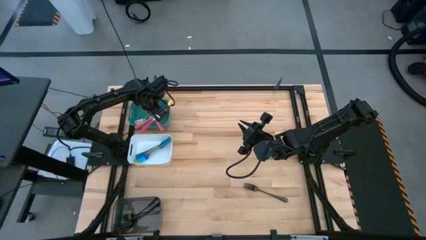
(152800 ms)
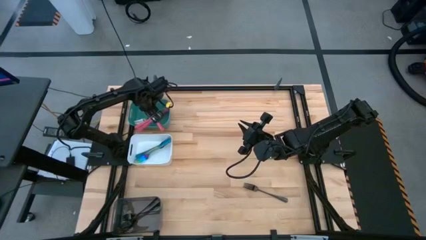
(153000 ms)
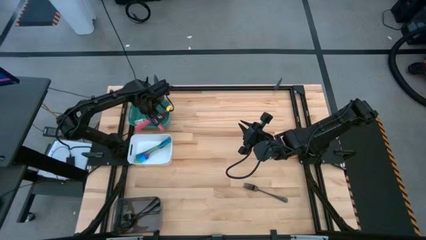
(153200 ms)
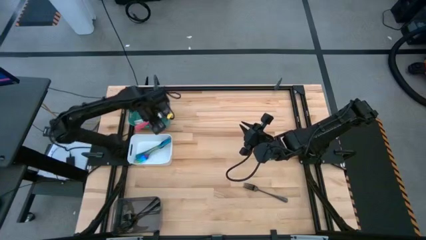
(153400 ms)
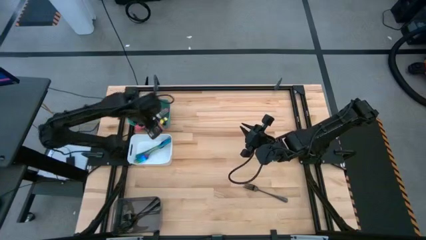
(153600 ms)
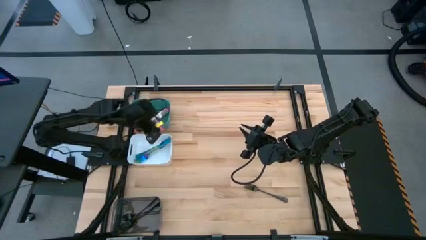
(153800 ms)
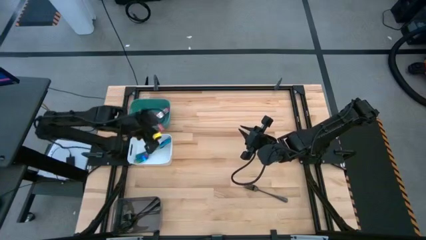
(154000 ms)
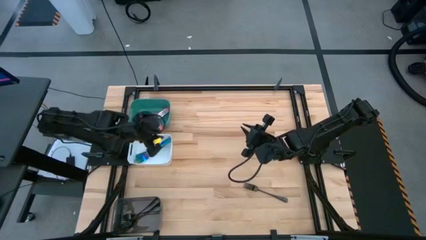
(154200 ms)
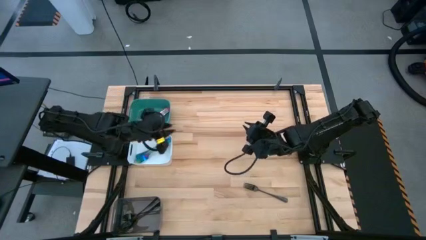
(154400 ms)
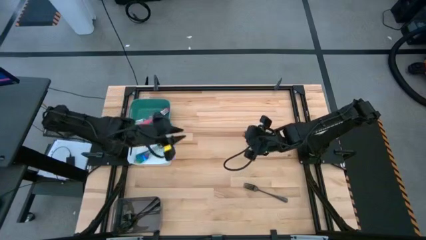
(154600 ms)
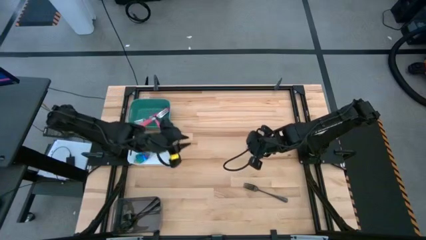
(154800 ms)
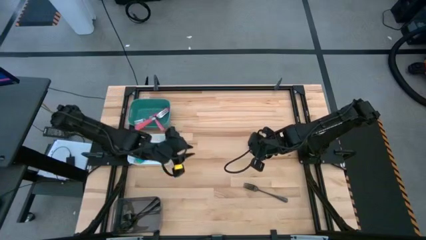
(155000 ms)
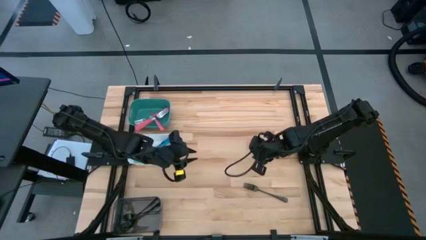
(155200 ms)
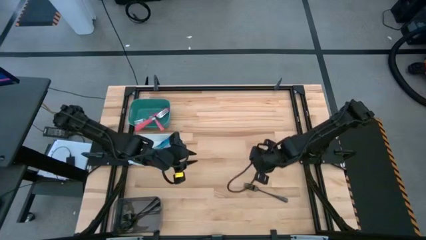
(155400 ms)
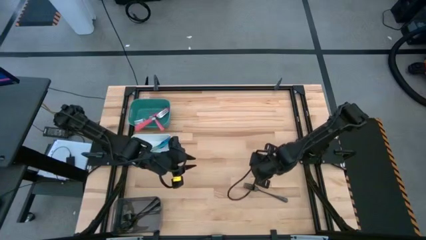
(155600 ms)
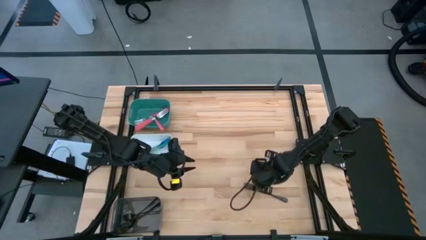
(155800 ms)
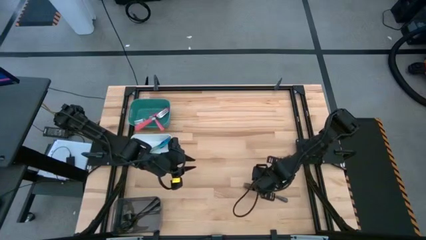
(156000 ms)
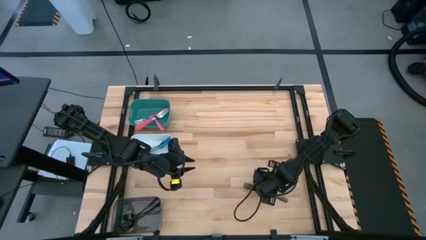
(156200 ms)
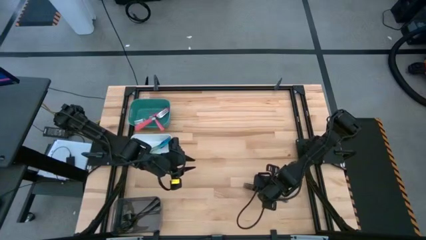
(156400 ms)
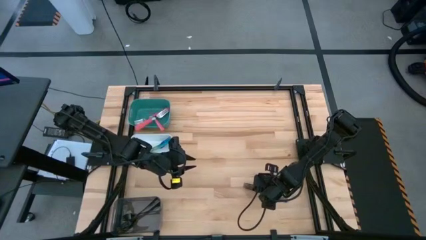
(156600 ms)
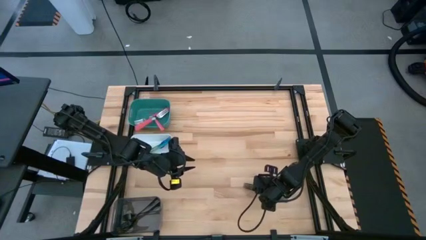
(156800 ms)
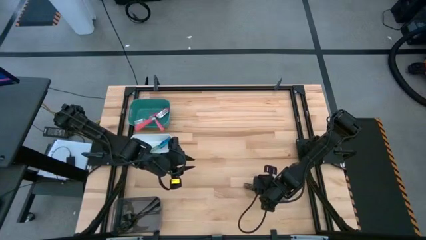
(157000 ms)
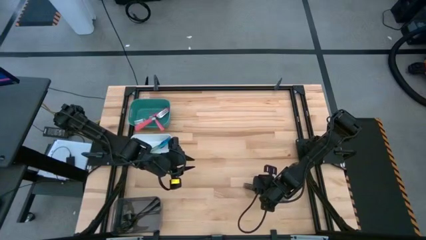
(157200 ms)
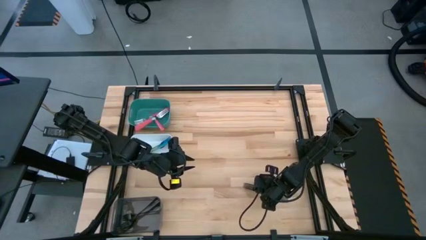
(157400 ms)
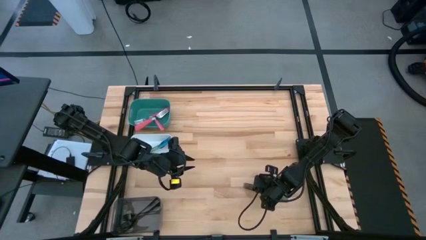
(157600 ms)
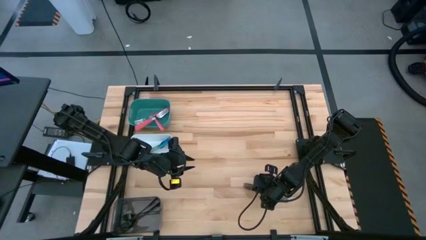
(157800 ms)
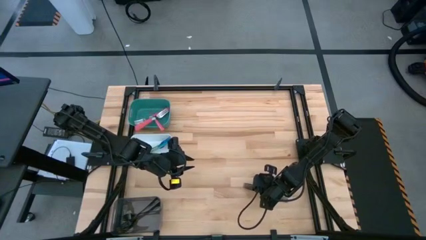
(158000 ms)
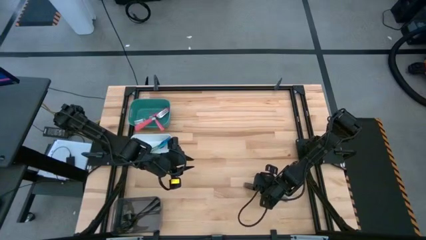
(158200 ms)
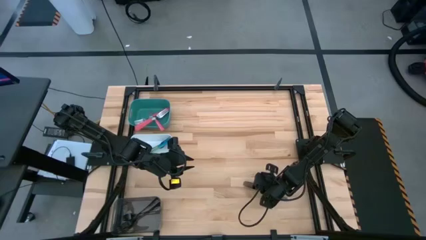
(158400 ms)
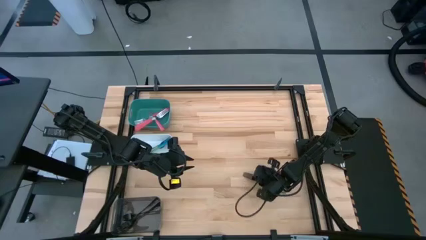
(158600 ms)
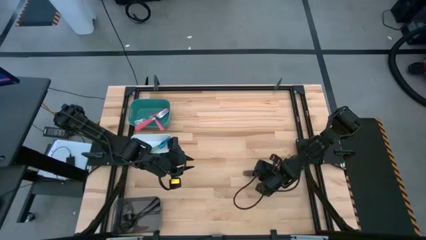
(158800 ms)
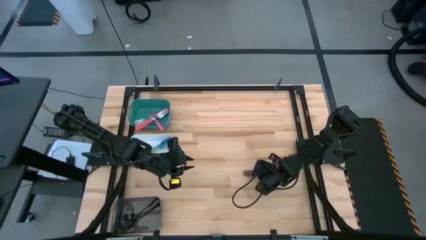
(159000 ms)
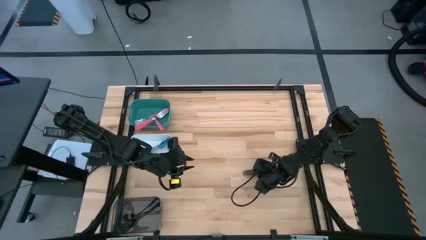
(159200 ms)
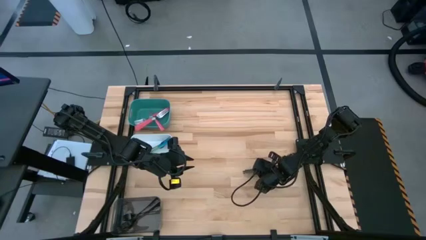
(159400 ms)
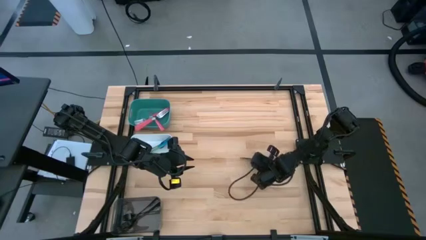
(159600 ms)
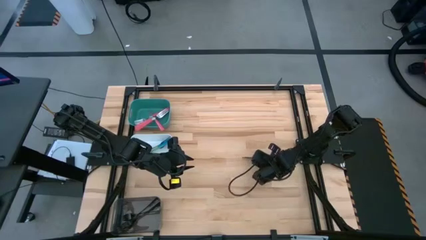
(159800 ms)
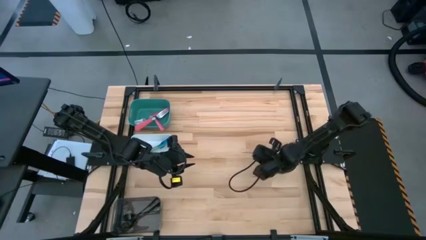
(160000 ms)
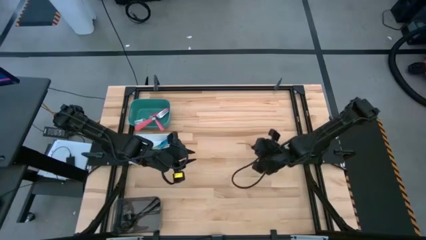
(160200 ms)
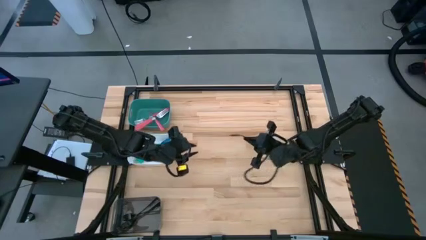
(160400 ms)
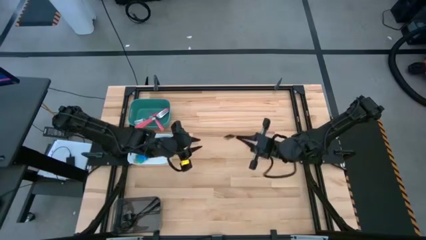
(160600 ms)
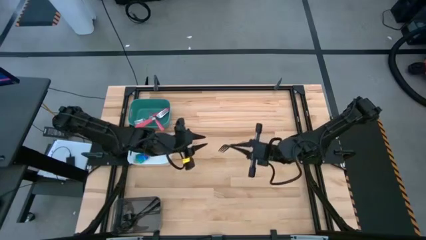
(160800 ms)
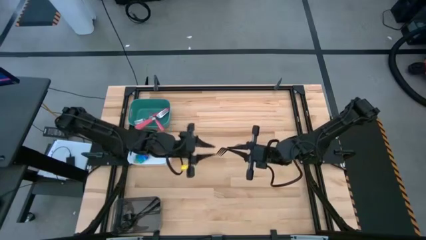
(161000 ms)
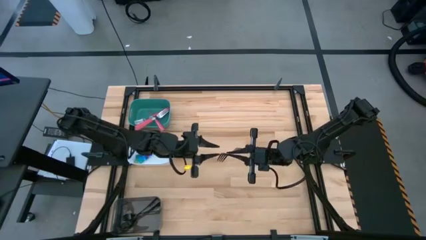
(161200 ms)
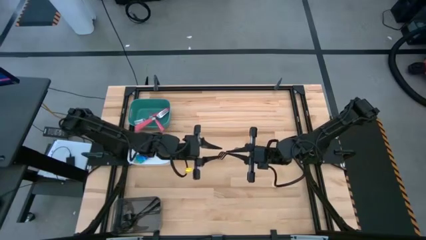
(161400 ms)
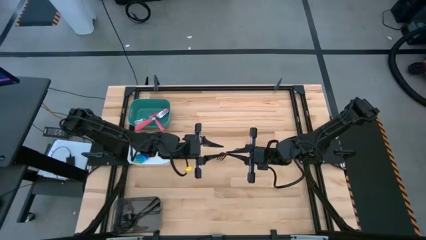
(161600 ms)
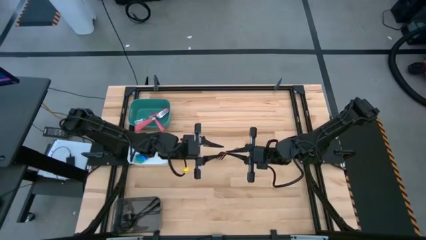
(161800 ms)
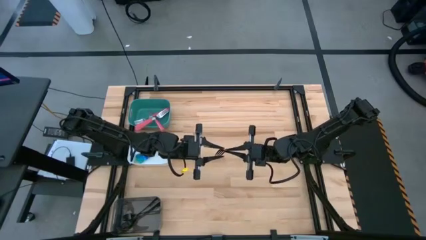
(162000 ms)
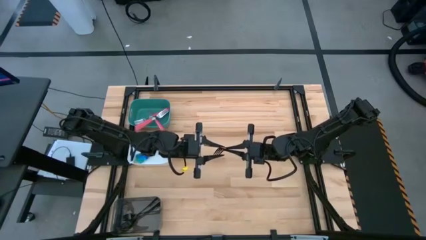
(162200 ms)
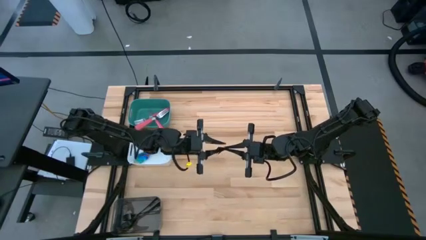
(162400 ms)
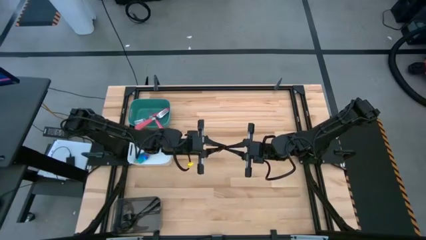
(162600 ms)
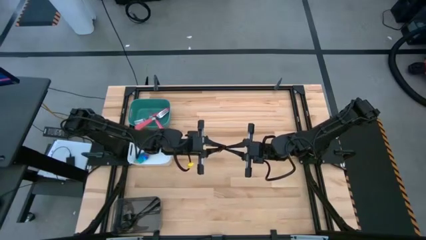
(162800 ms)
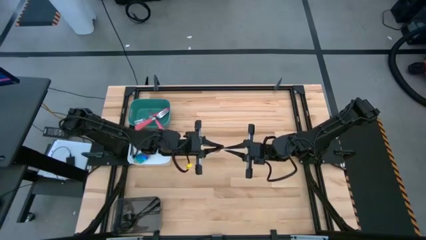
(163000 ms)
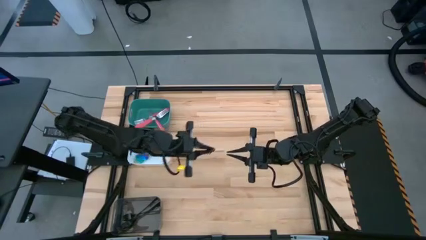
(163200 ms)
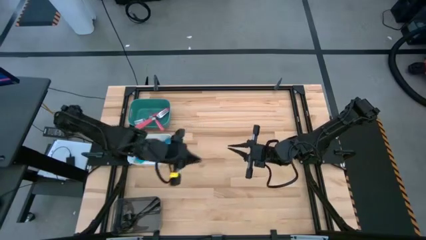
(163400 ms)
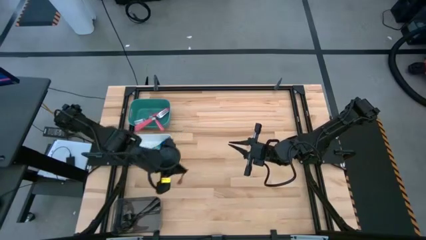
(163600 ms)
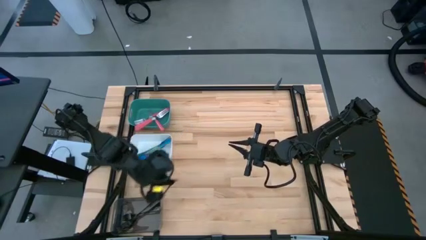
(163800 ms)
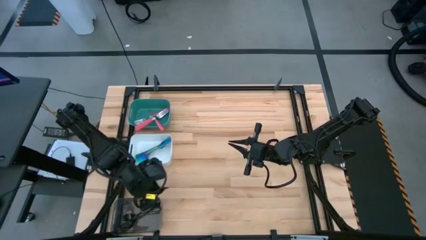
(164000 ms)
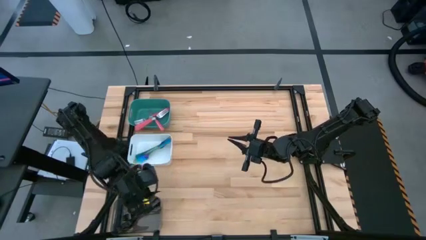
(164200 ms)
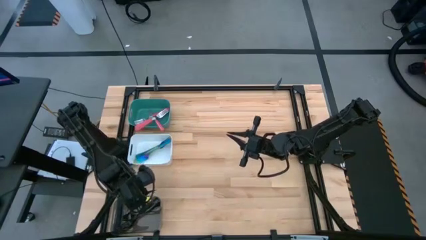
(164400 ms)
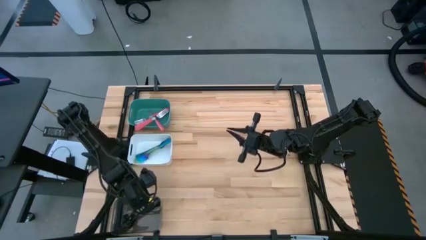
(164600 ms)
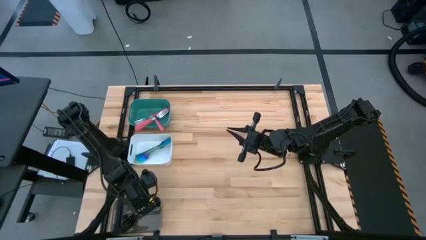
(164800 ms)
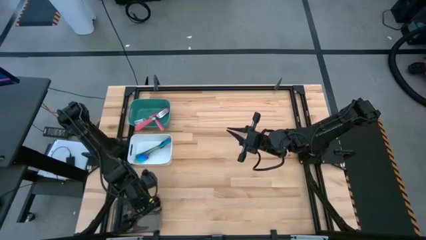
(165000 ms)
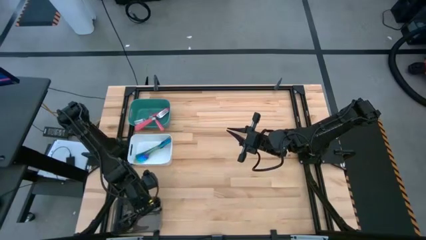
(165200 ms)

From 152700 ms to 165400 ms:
Task: Sort silverware by color (type)
Put the black fork into the black bin

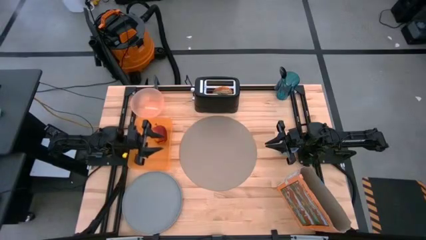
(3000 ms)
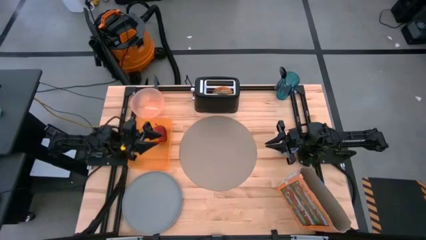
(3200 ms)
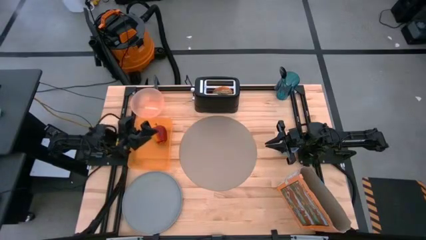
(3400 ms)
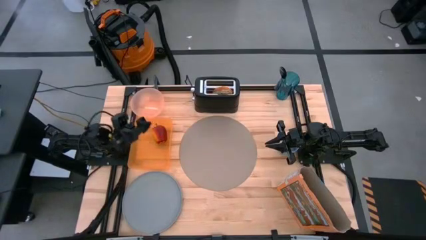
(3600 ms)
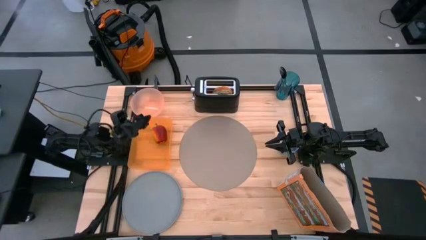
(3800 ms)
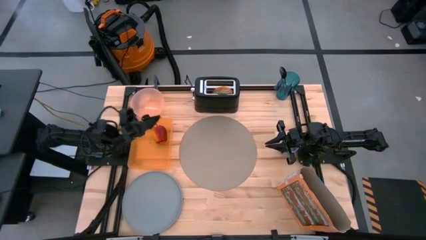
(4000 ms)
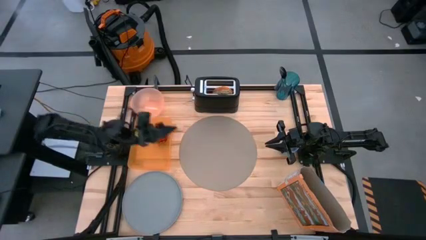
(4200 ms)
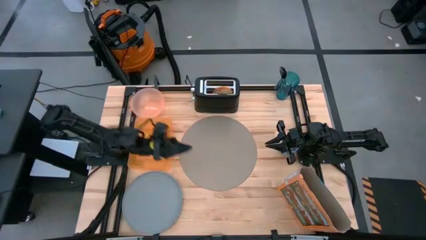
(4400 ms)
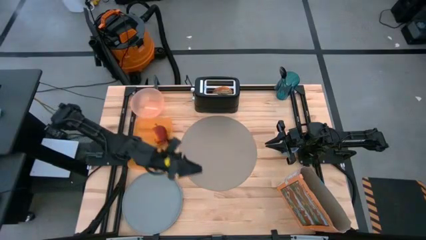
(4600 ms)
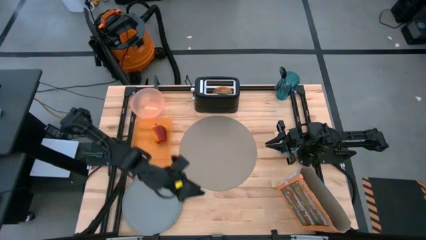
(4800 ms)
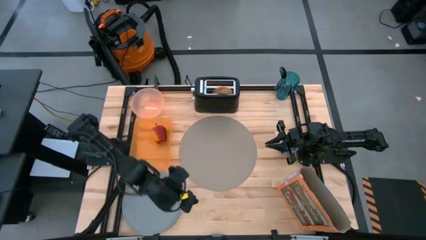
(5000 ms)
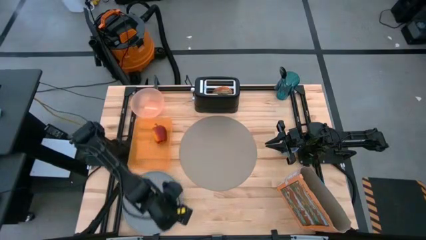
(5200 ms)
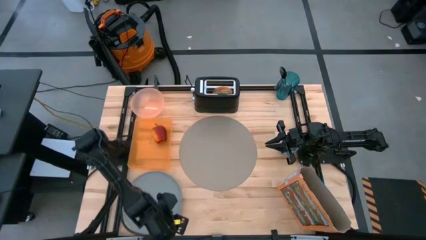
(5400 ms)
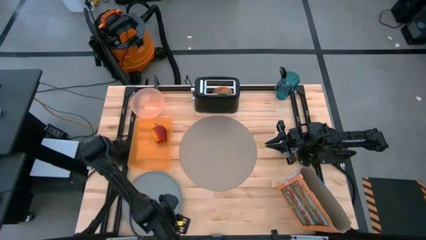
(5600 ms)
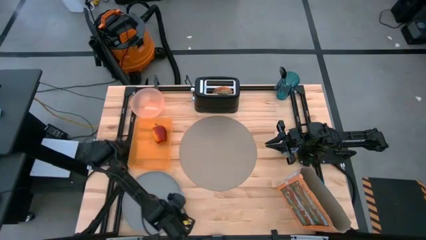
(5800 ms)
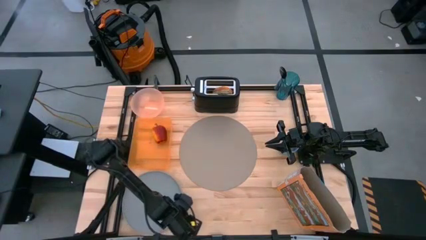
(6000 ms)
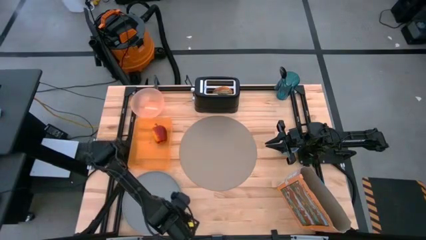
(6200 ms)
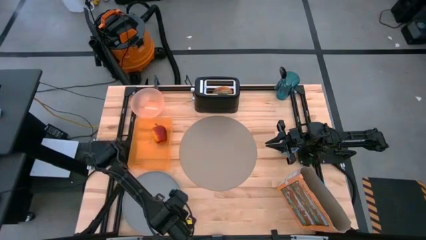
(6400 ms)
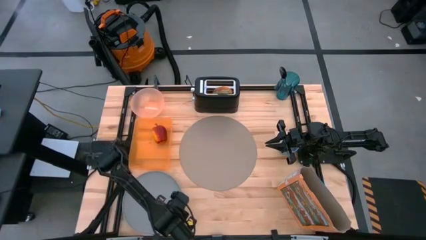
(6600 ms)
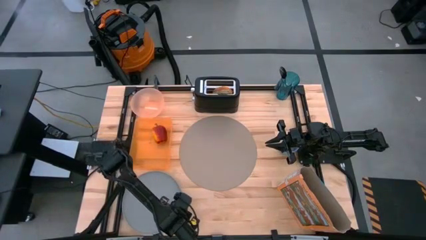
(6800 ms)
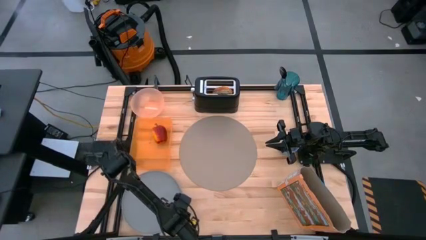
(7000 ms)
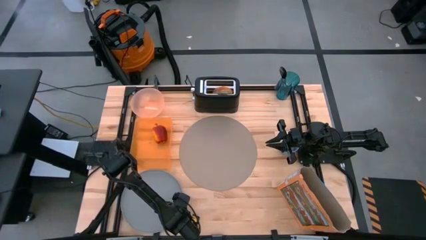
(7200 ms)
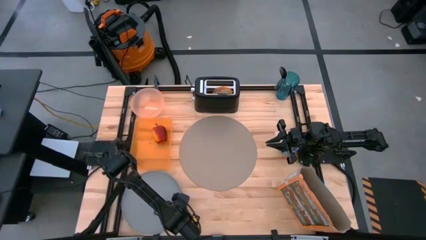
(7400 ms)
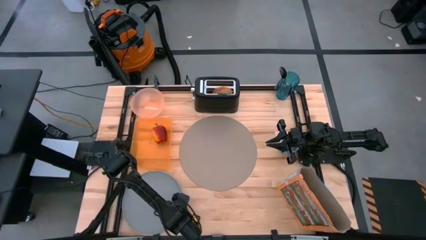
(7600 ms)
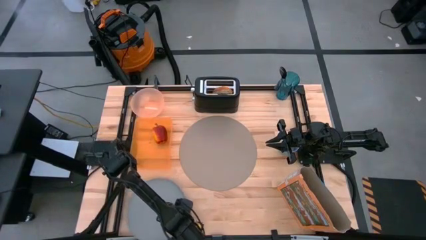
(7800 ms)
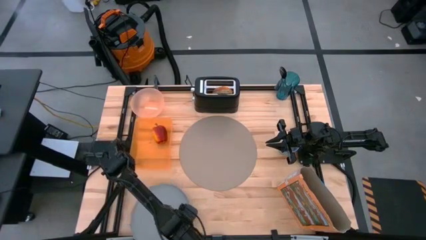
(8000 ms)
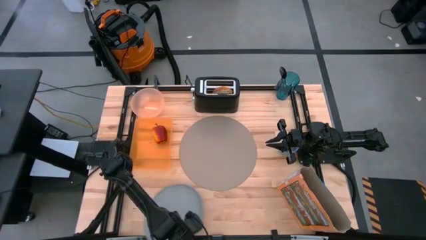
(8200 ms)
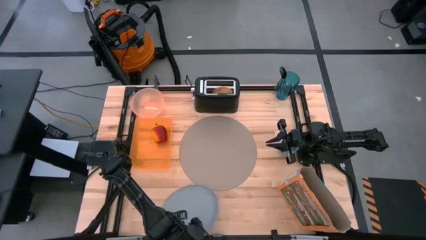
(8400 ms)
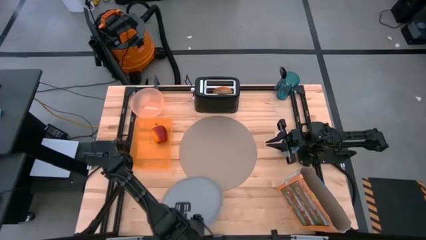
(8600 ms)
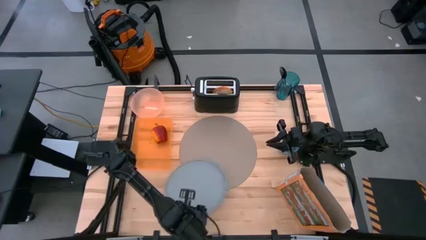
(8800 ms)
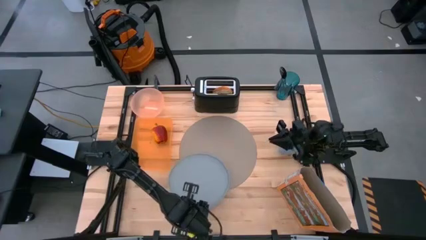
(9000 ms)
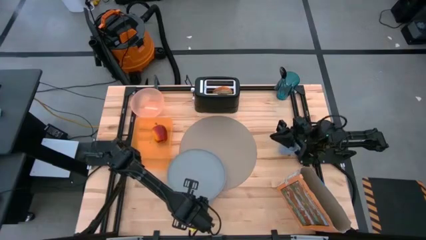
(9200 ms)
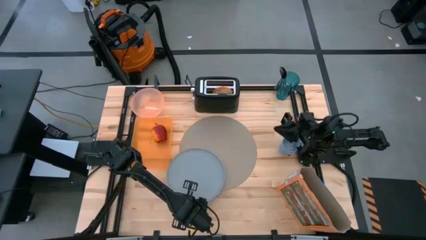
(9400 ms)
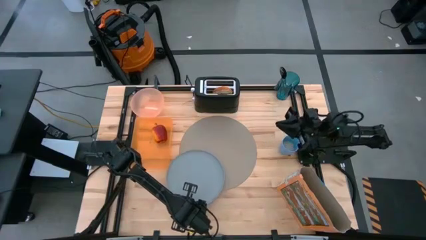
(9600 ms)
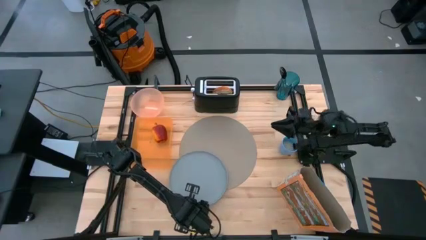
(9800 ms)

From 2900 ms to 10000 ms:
Task: Arrange a breakfast setting
Put the blue plate on the gray table mat
